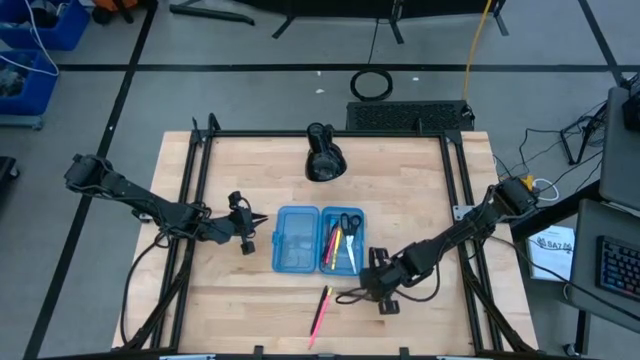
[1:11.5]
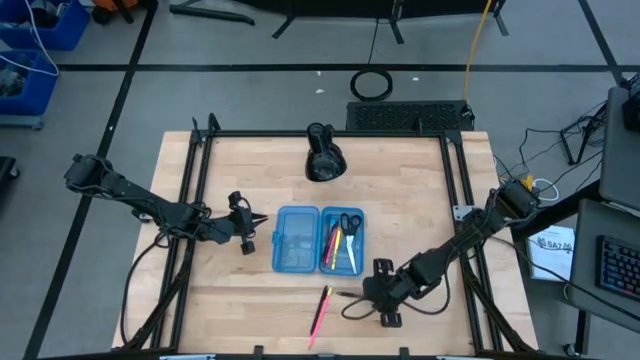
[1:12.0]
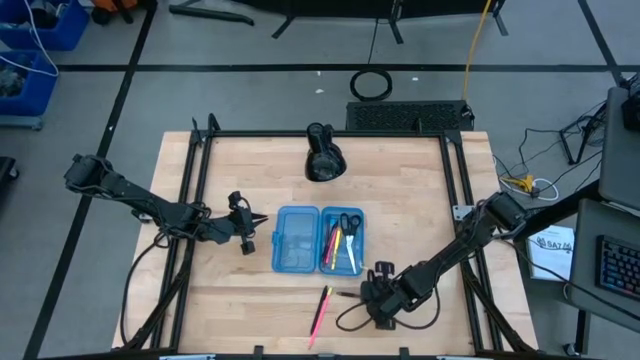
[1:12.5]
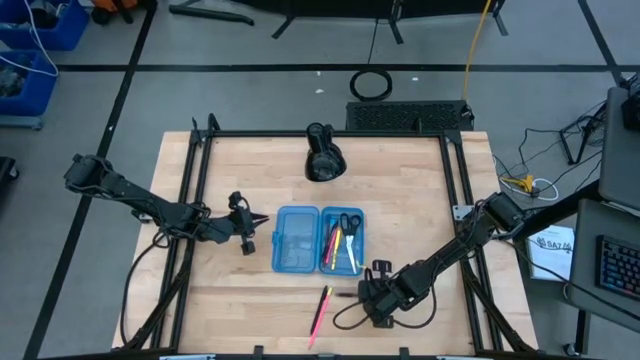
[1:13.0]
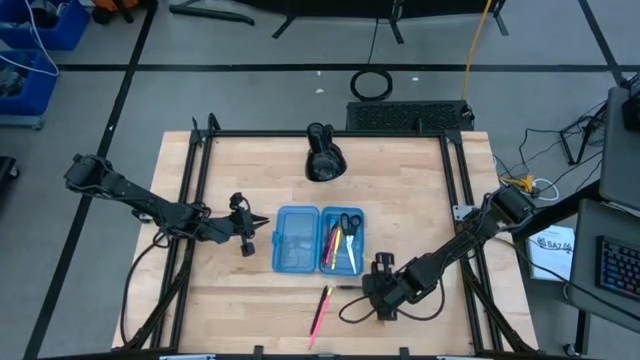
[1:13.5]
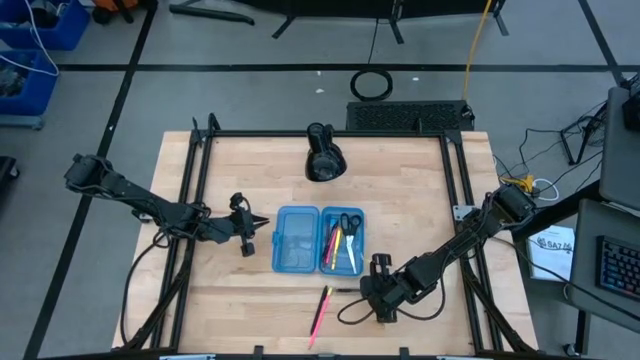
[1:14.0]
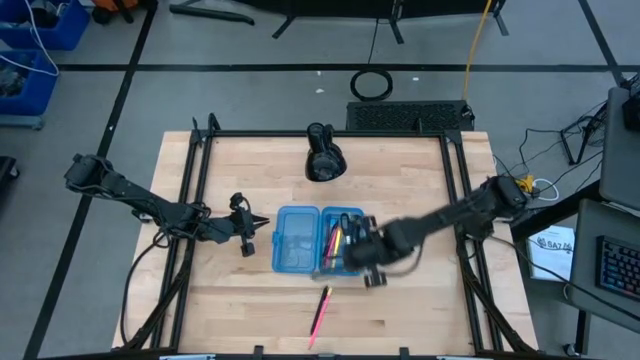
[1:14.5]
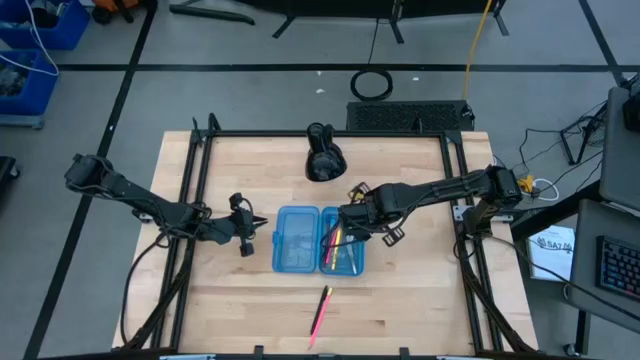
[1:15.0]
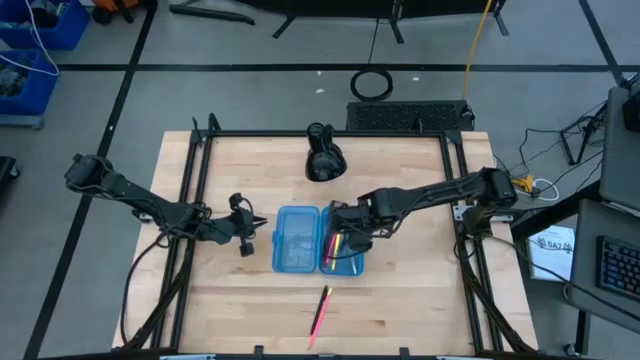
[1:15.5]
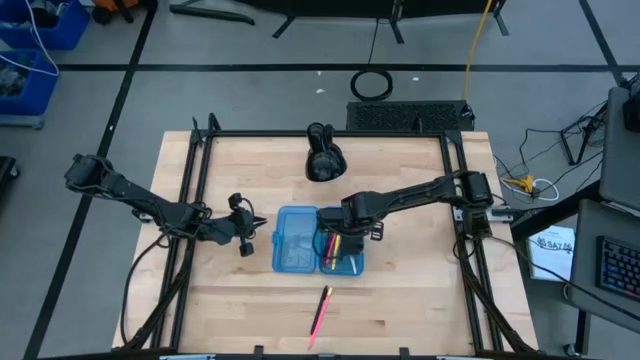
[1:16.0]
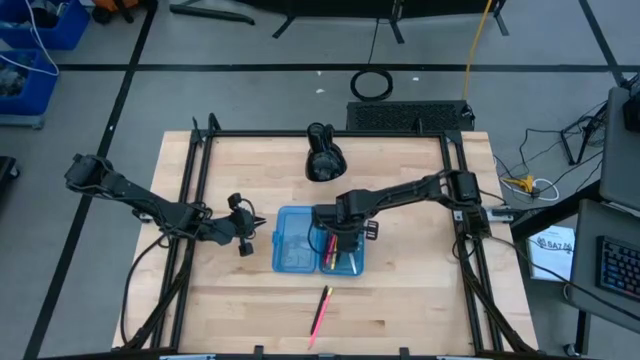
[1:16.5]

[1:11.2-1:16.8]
Task: Pick & place school supplies into a supply box
Put the right black pen into the blue supply box

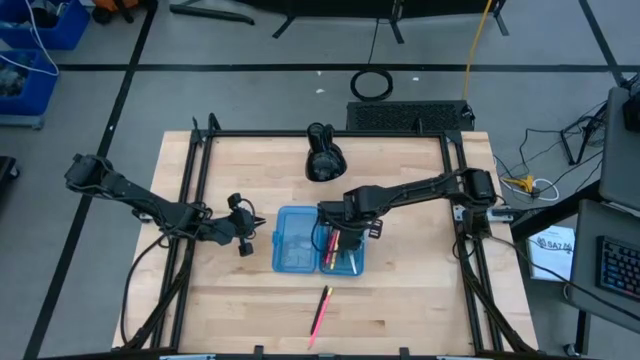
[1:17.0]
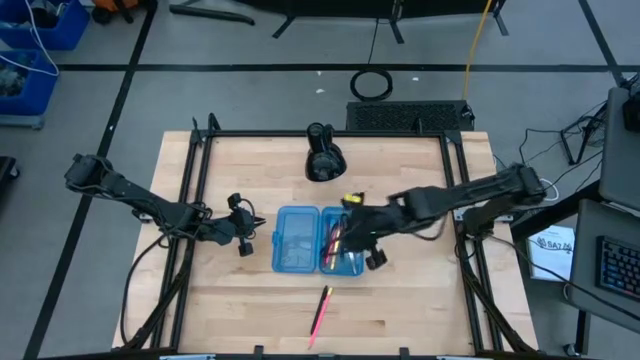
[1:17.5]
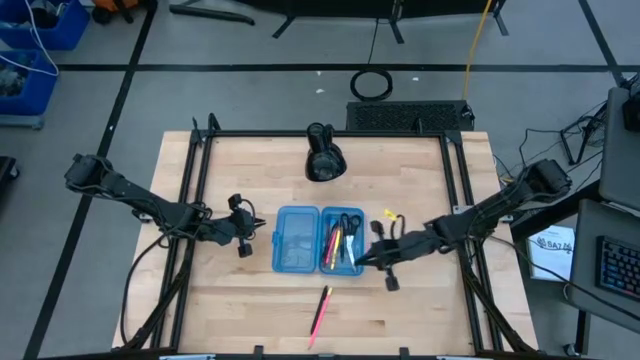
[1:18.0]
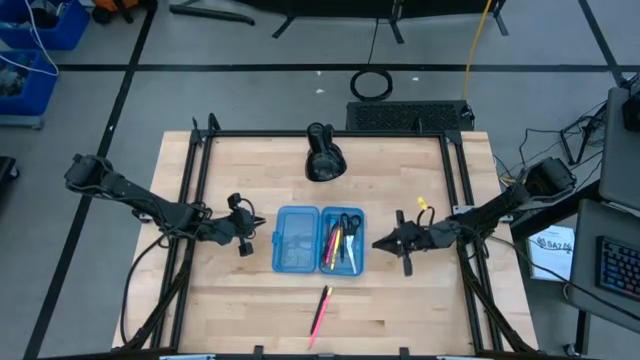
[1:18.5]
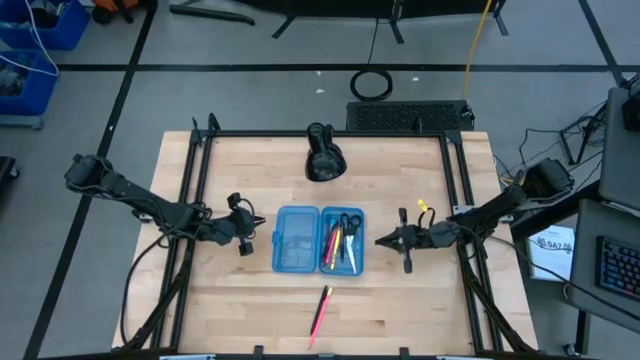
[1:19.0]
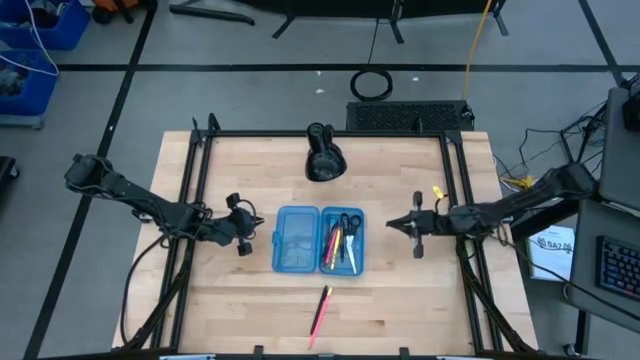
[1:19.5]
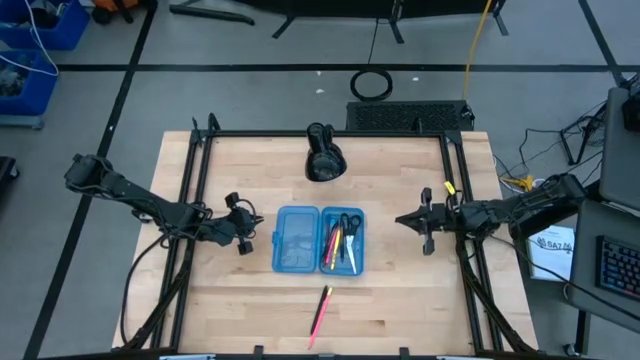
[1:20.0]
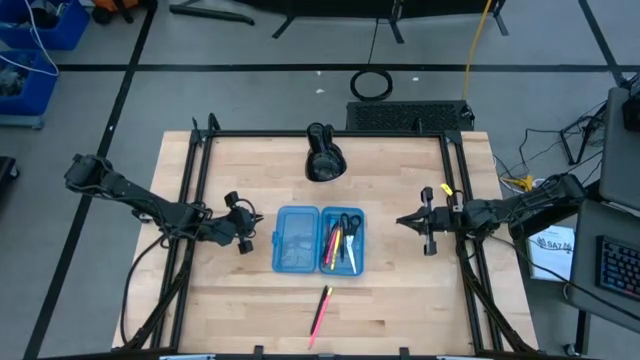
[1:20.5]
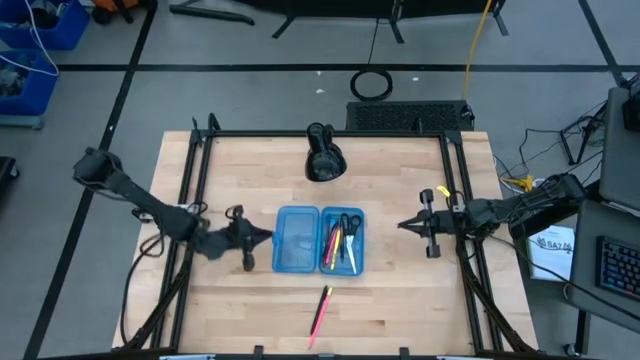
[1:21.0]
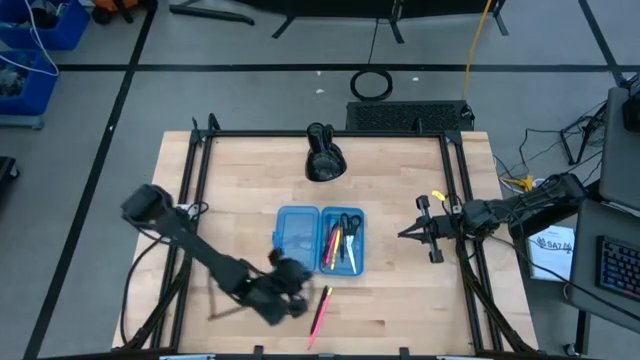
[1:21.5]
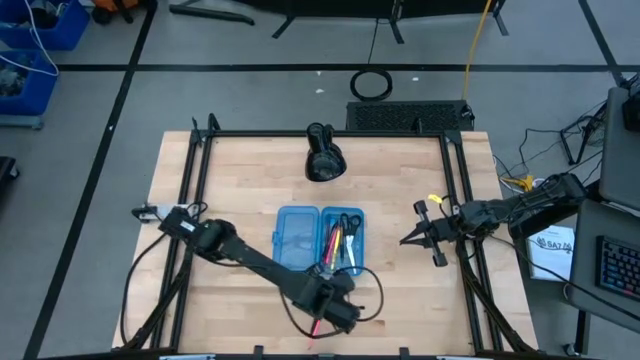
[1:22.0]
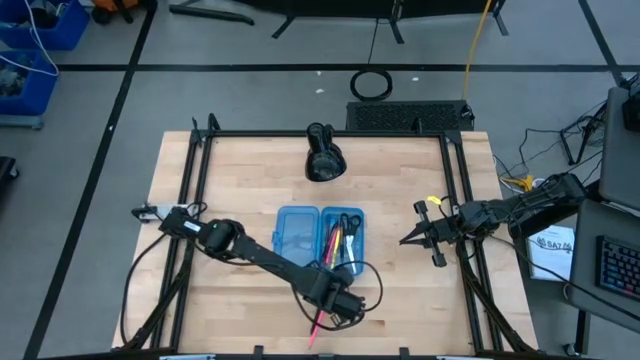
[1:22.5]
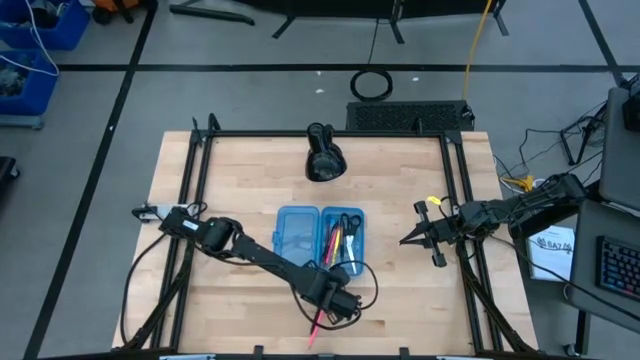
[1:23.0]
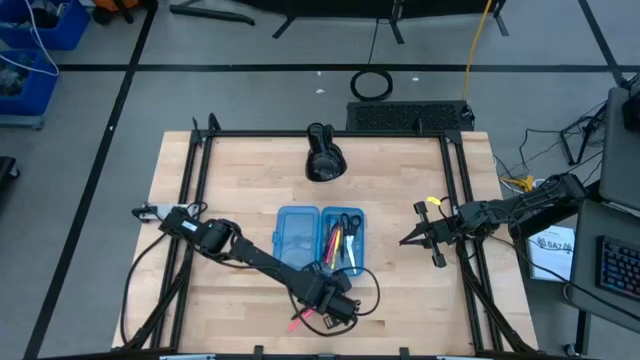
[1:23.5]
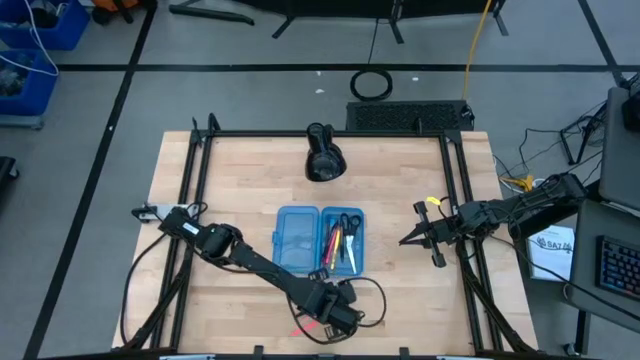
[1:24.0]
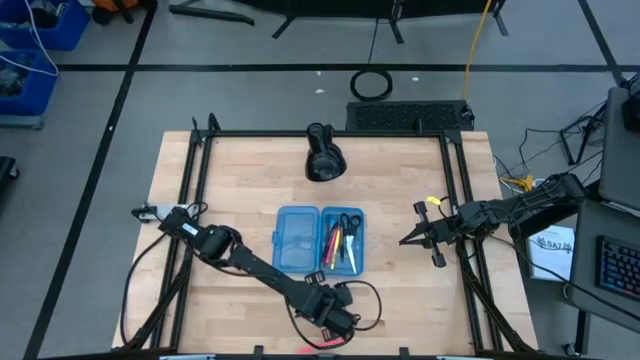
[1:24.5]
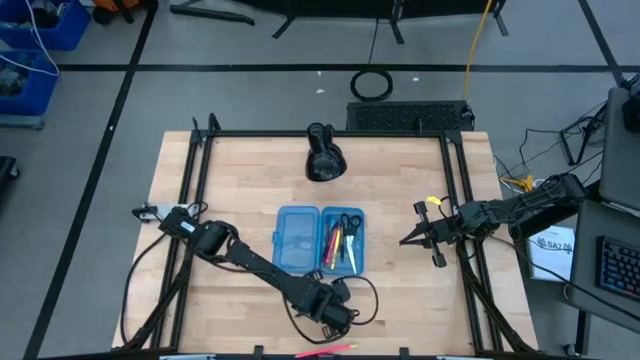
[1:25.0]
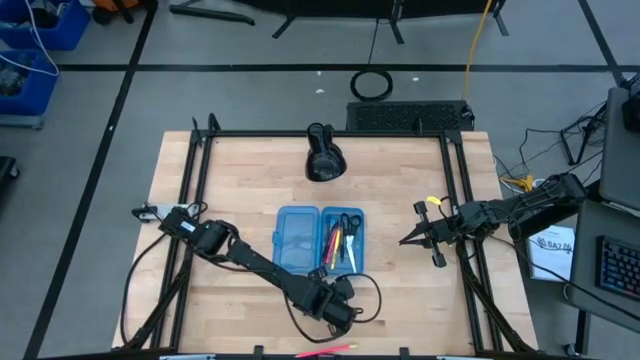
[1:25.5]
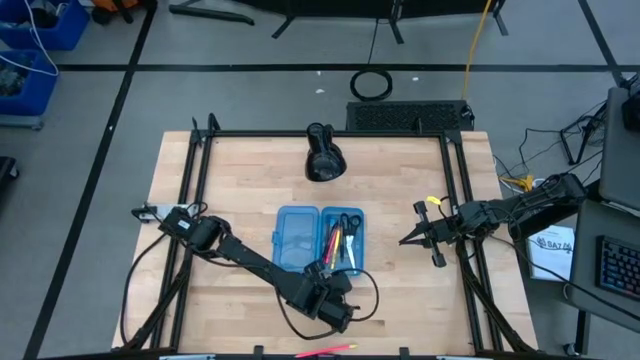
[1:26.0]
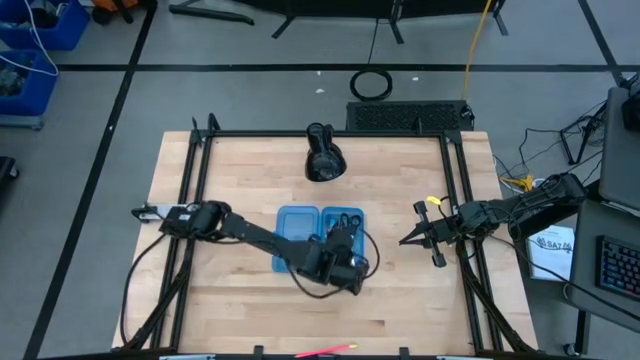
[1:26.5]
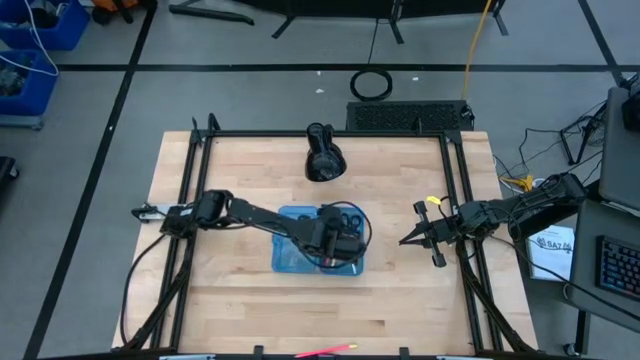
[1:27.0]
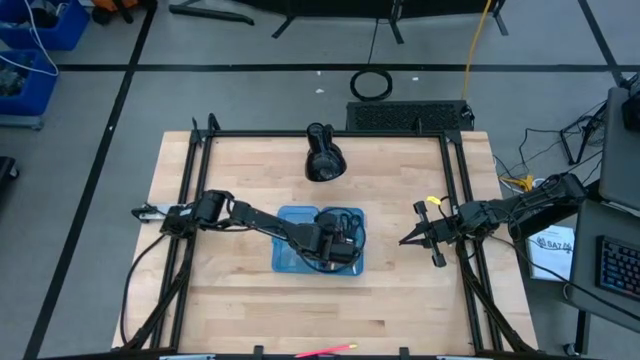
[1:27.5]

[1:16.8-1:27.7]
Put the black pen into the blue supply box

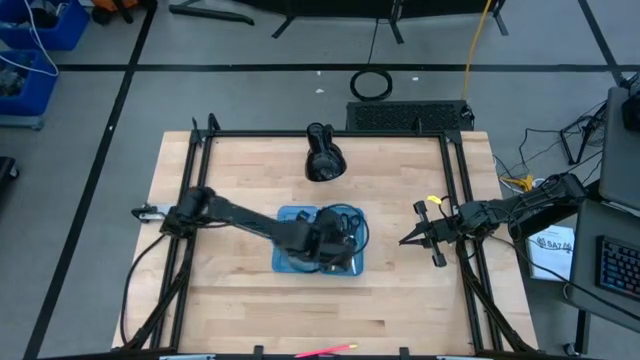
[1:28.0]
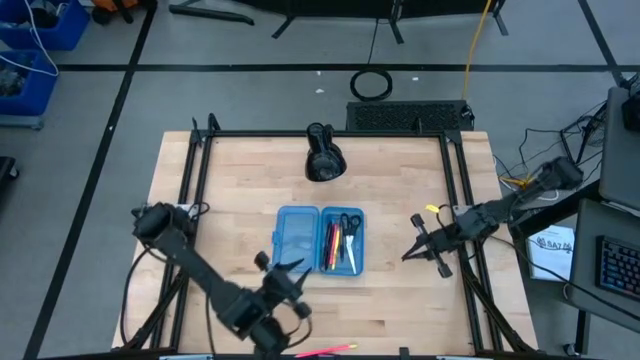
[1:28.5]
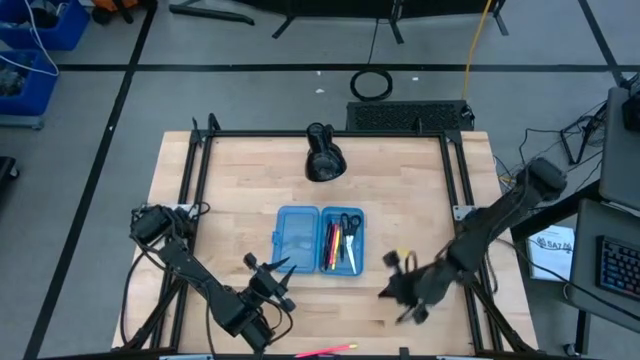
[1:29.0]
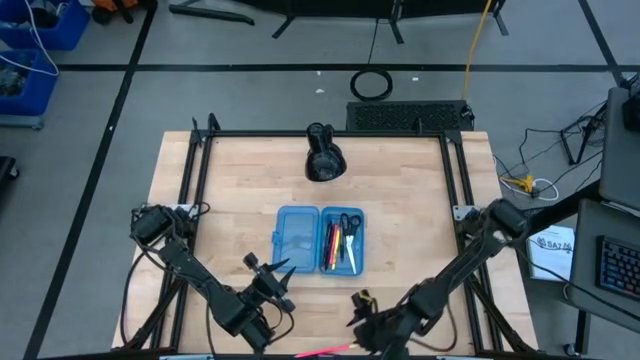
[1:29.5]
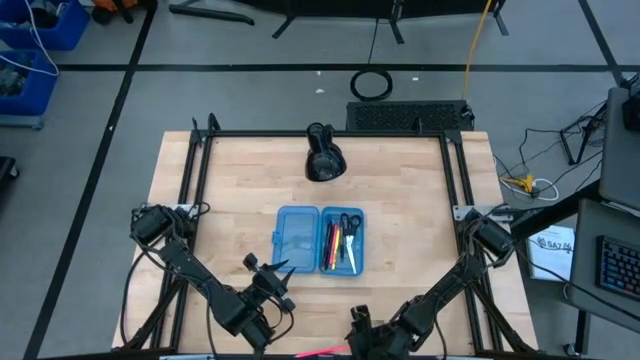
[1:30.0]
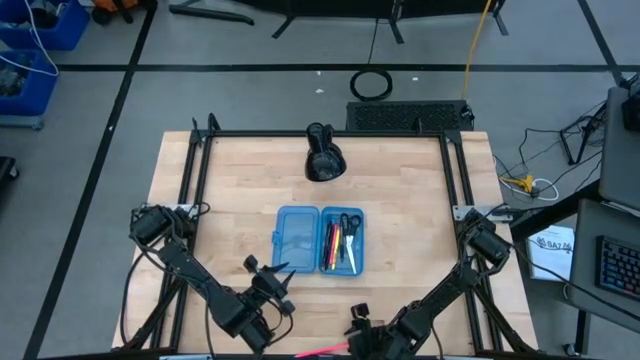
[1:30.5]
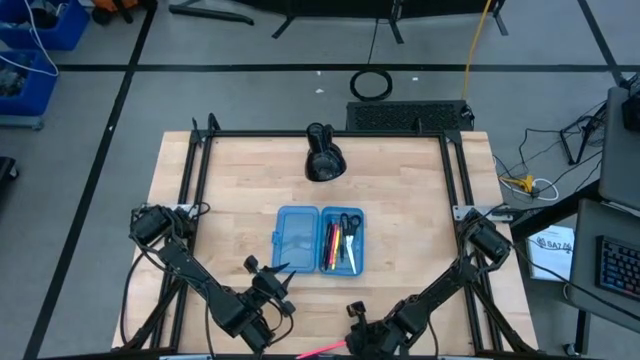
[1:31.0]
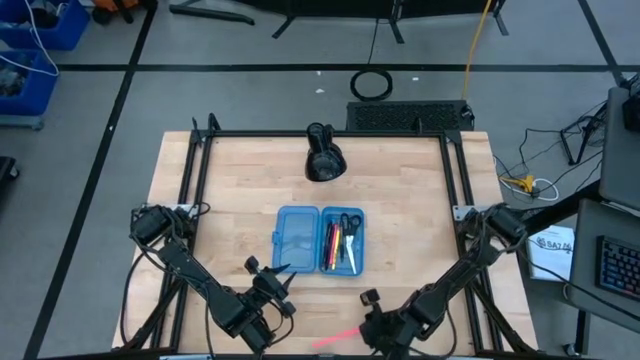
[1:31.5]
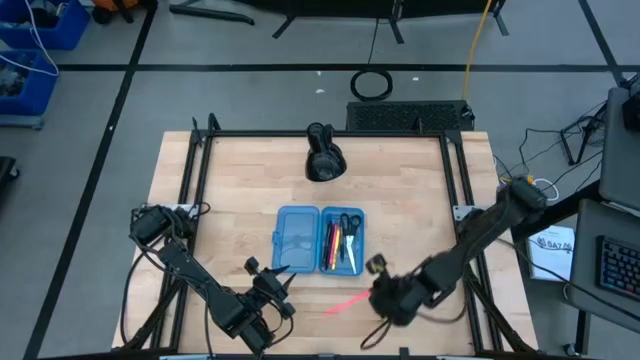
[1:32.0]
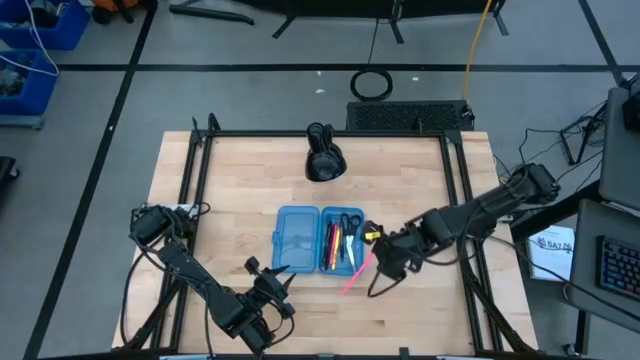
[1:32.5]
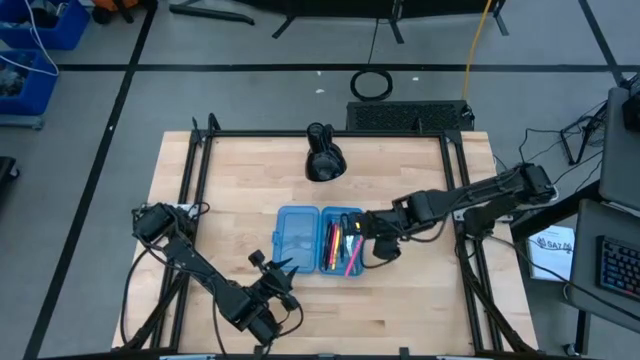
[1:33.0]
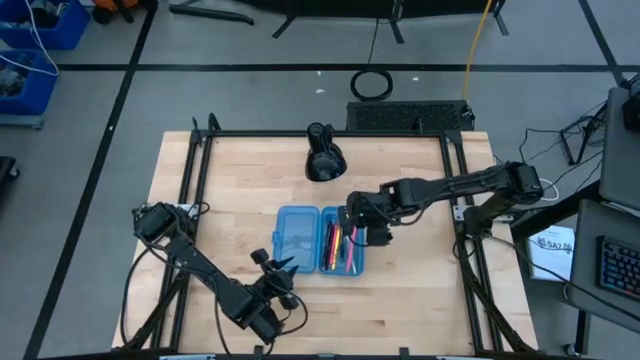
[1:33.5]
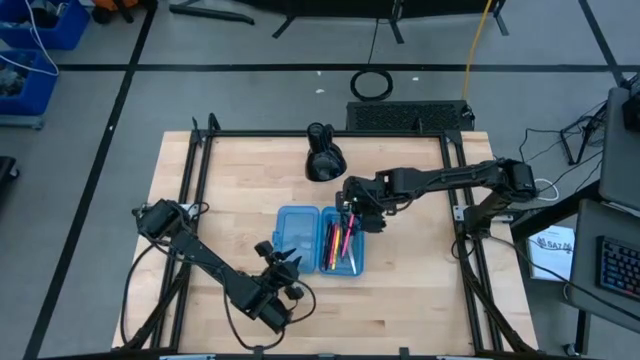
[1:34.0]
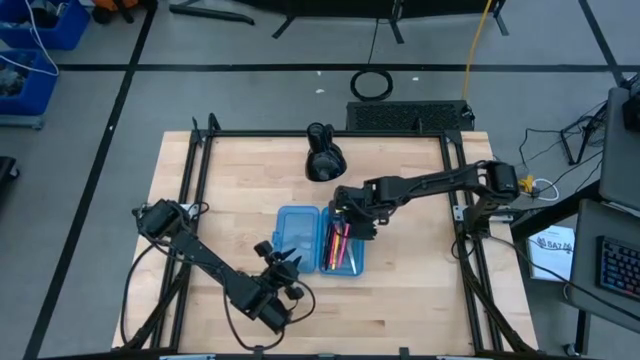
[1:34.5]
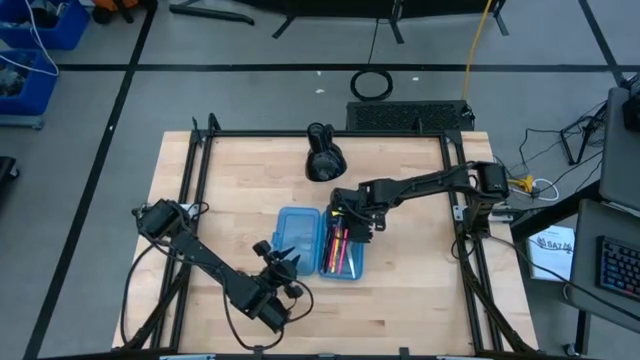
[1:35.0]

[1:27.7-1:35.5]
Put the pink pencil into the blue supply box
